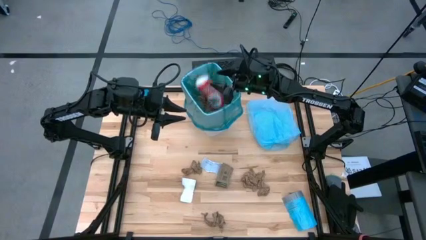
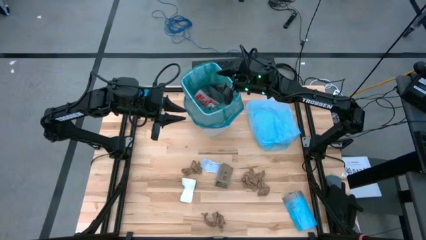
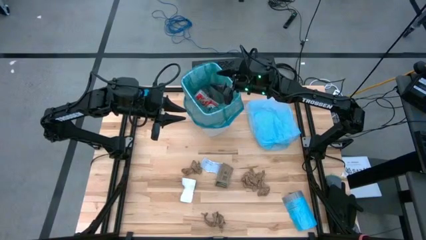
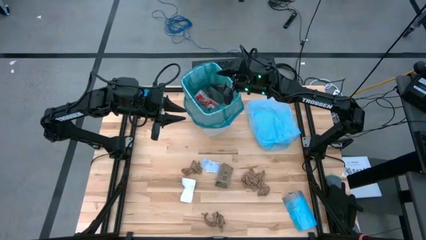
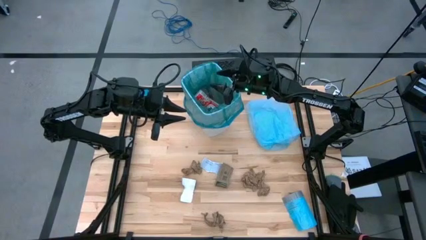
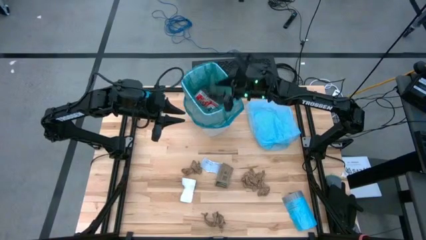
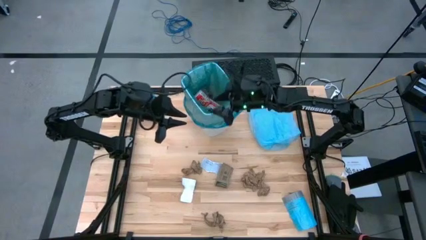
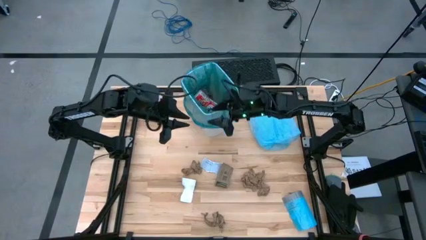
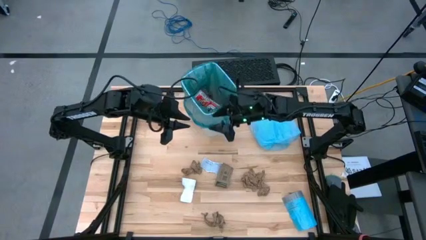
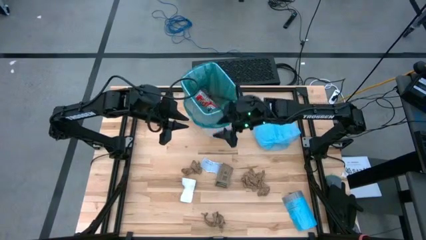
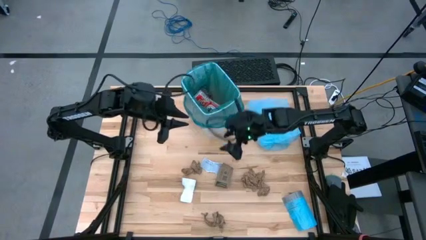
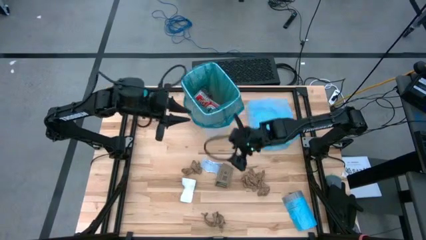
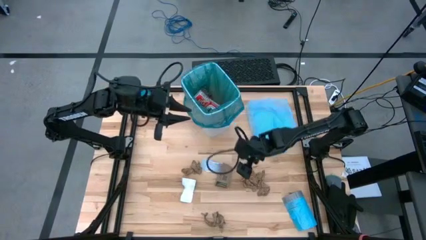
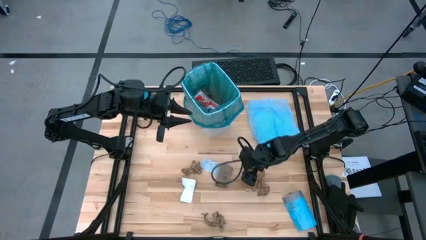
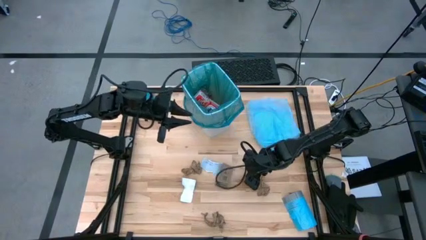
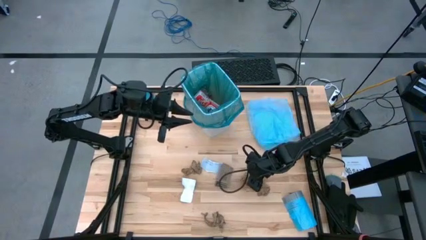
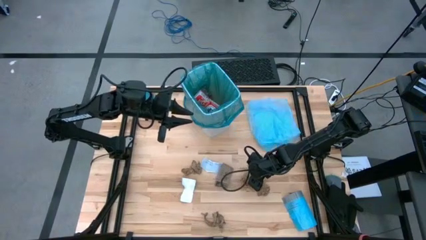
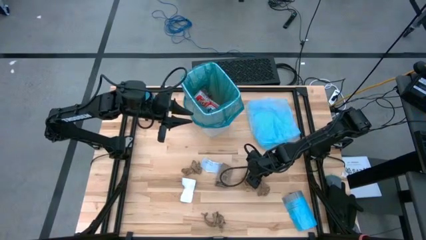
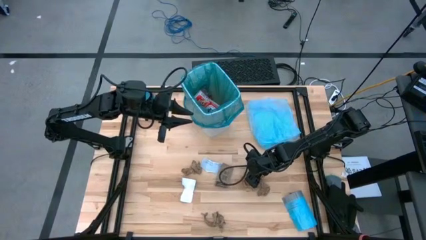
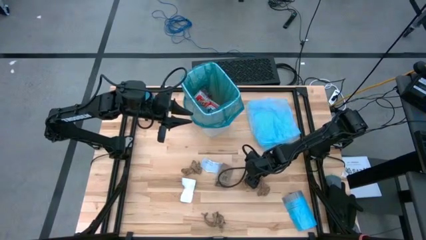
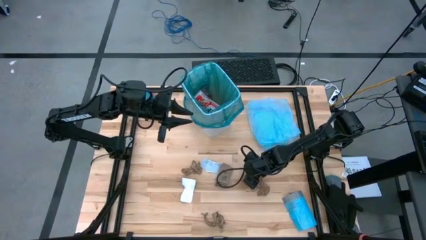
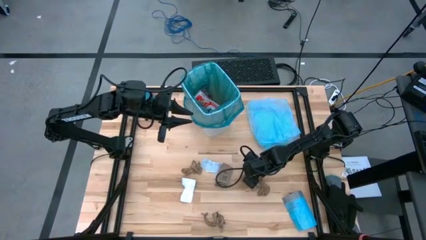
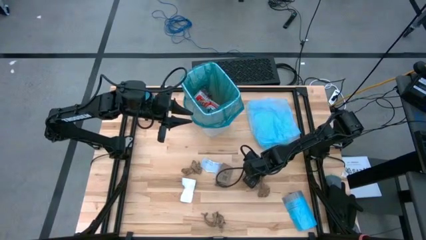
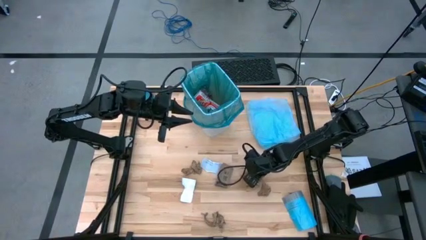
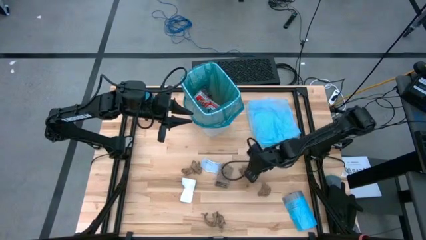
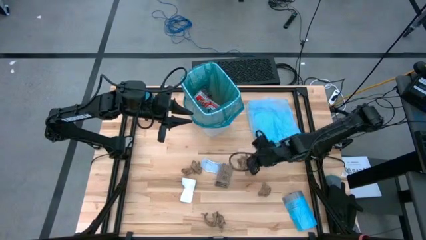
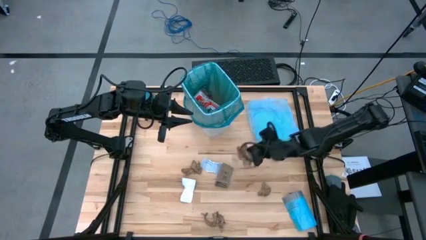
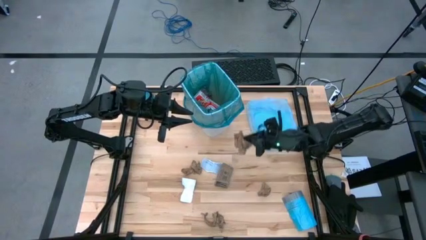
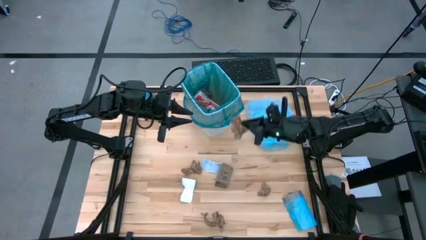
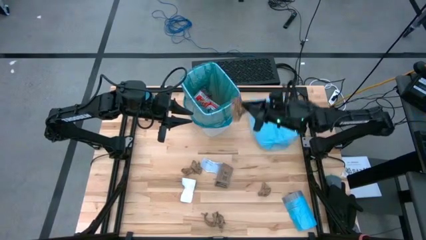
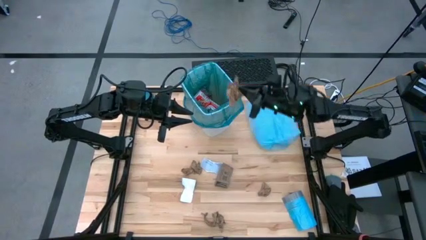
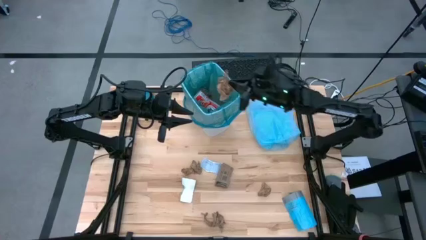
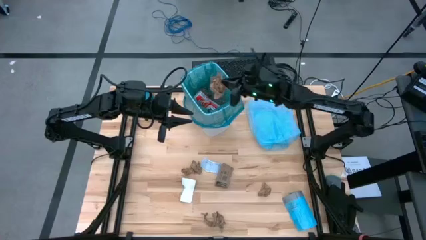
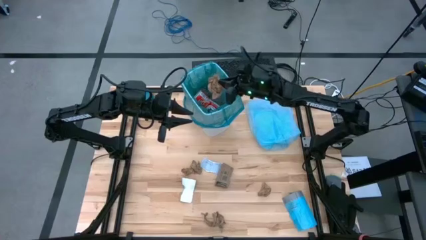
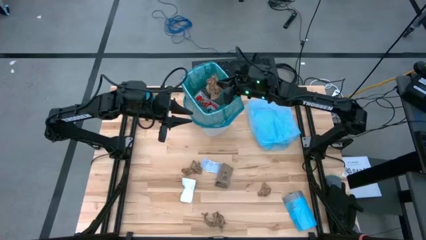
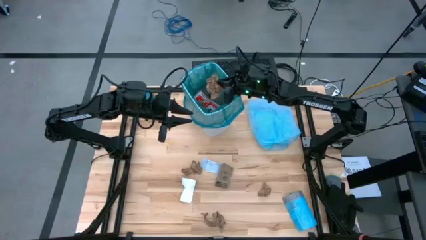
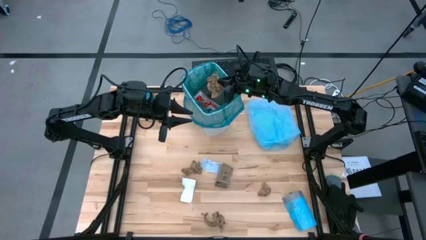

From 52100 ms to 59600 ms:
Task: place trash/remove bag and relplace
Put the brown paper into the blue trash bag inside the white trash bin

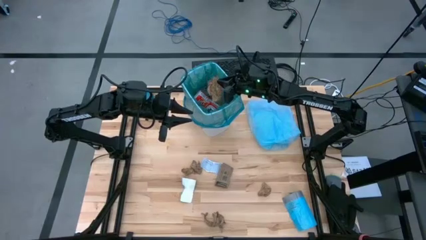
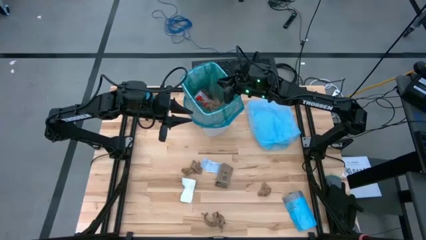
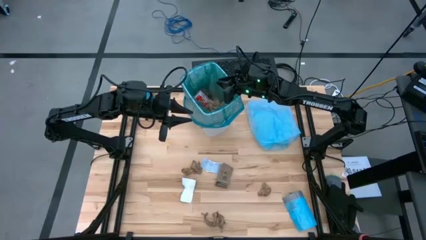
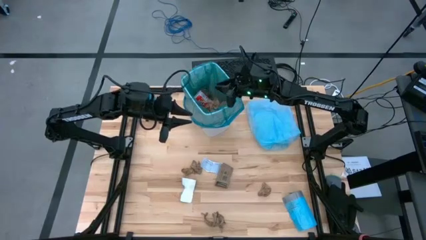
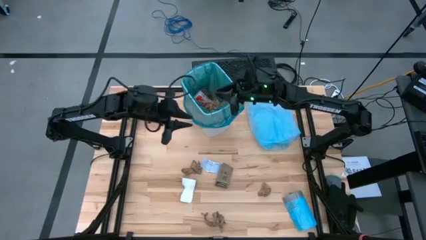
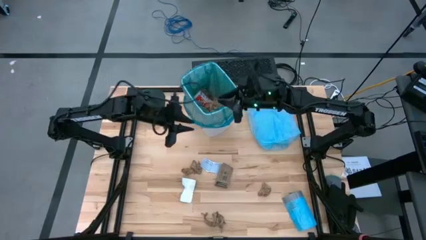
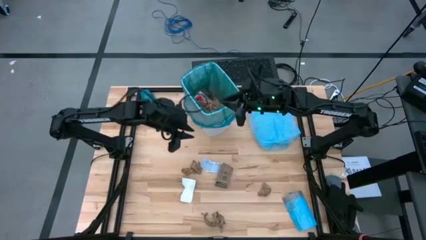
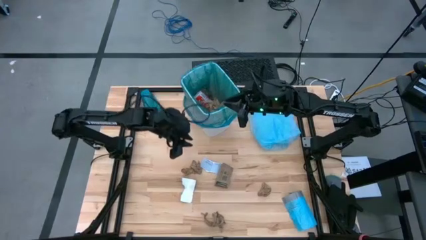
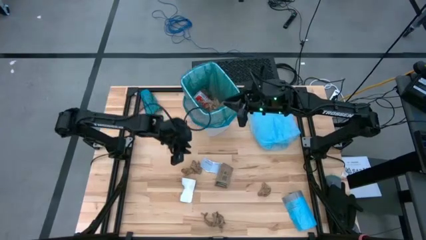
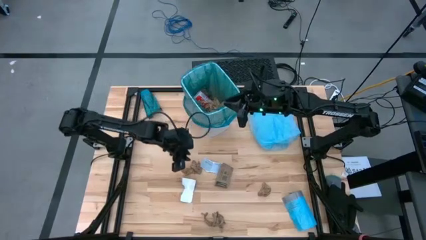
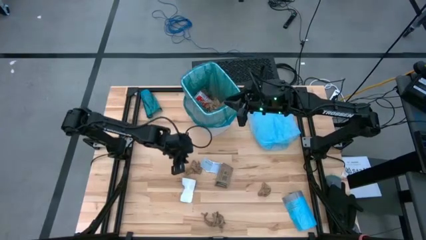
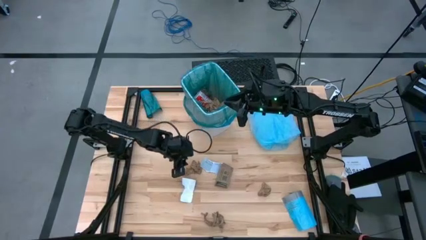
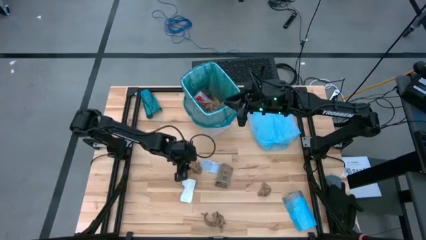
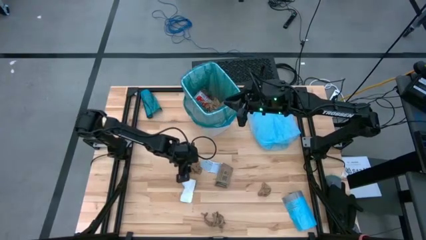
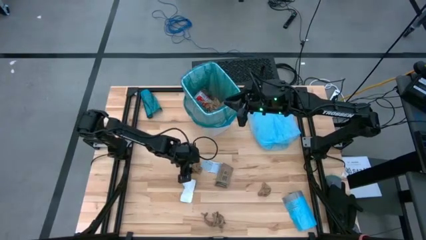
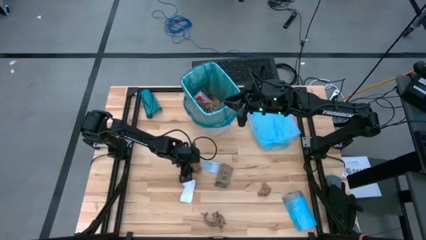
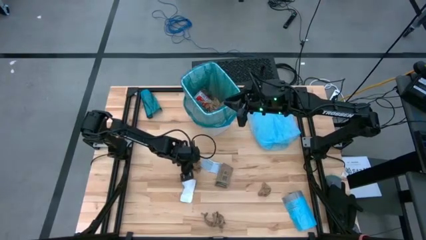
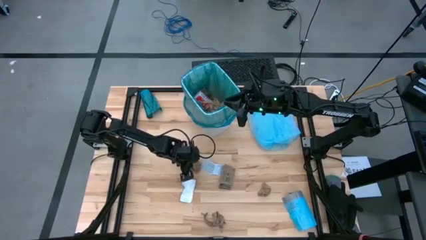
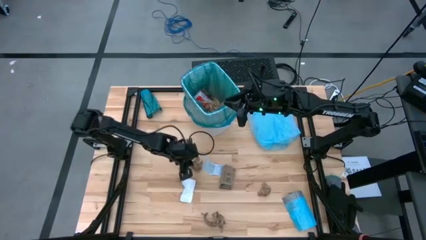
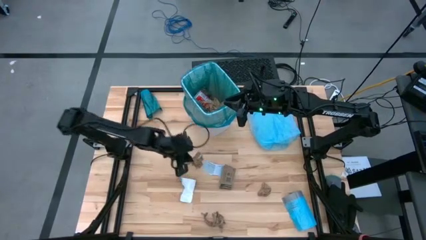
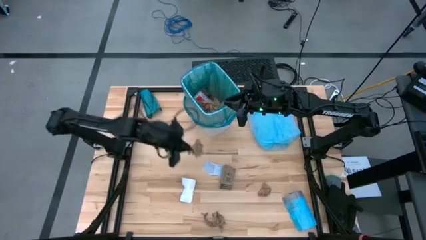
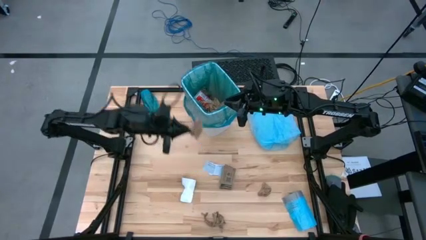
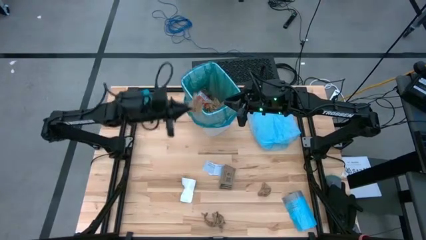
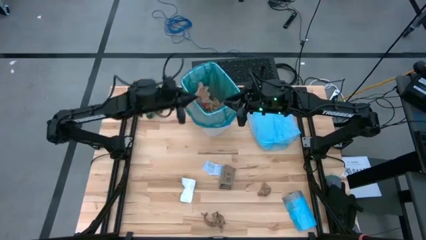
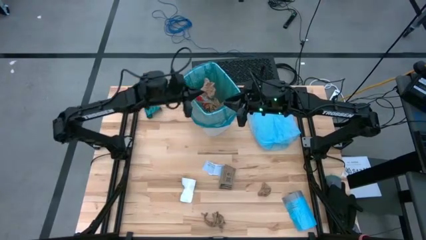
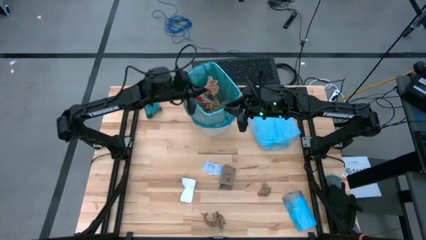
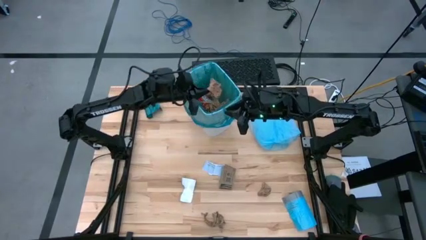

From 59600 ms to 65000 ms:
Put the brown paper into the blue trash bag inside the white trash bin

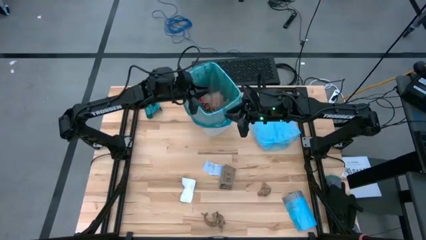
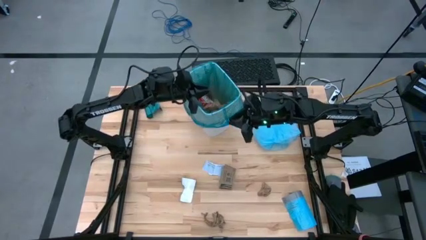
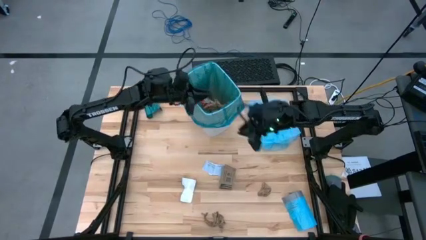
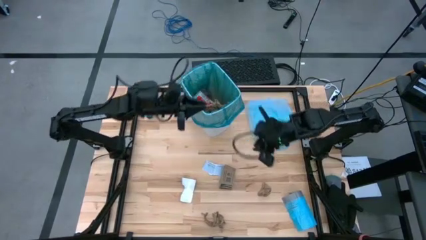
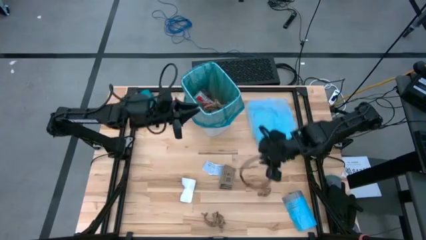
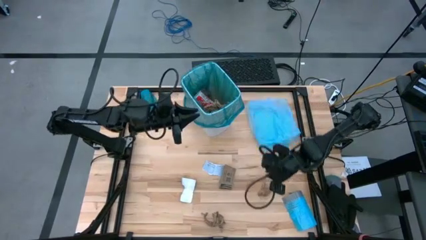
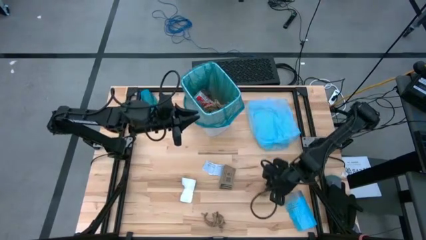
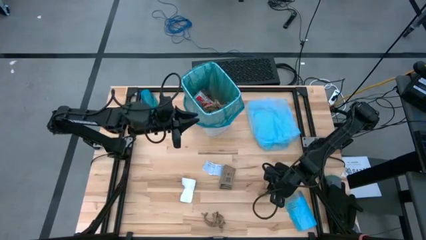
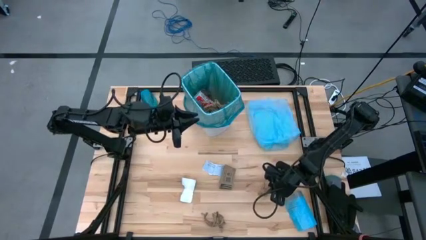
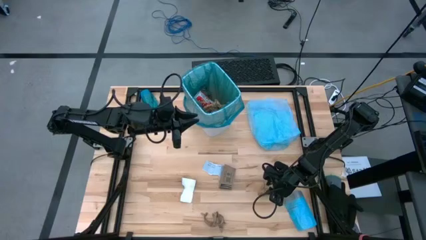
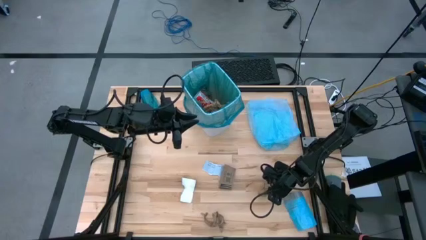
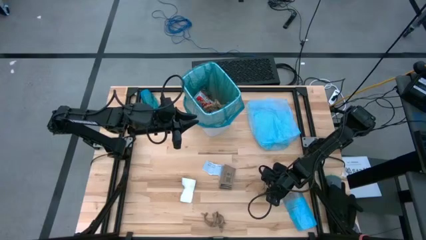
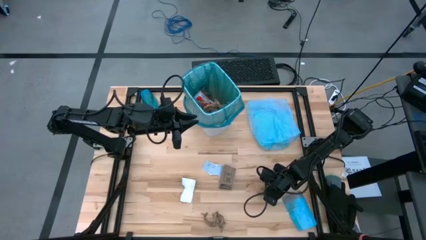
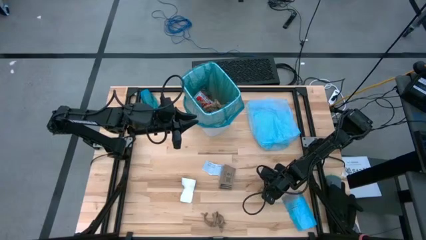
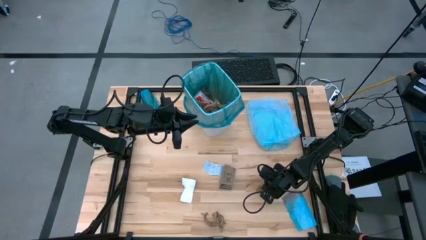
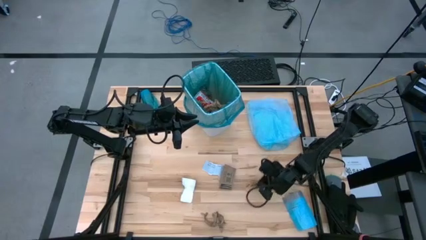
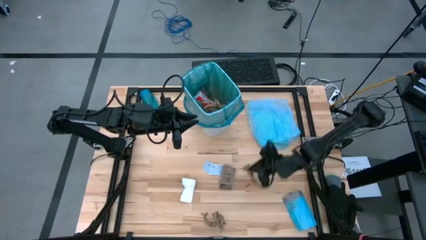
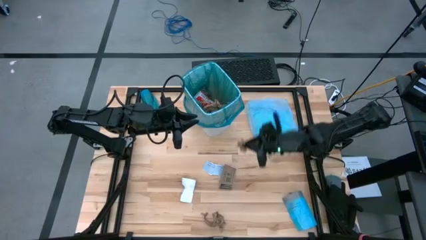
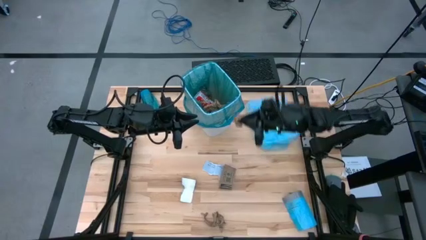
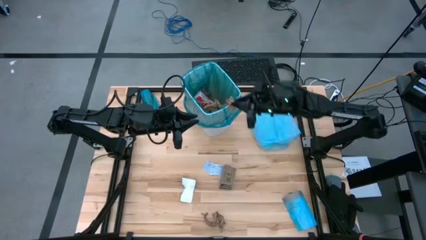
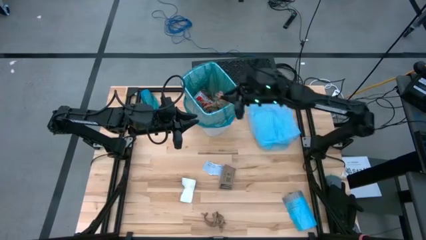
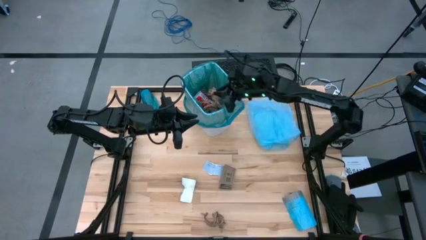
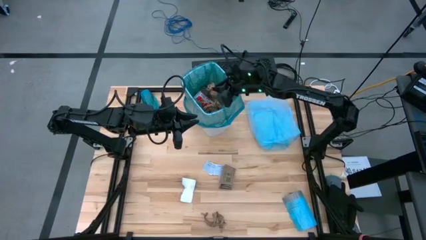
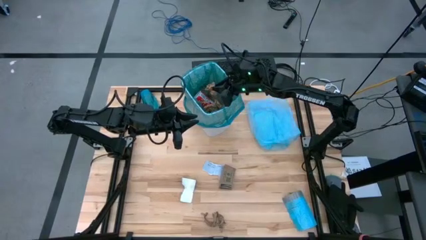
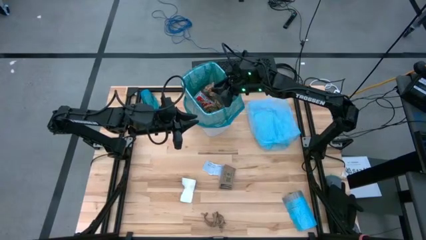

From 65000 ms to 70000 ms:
Put the brown paper into the blue trash bag inside the white trash bin
